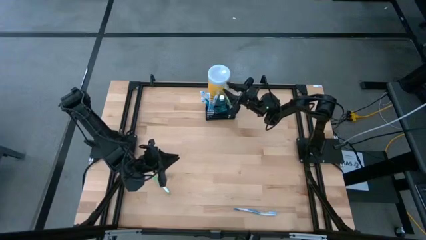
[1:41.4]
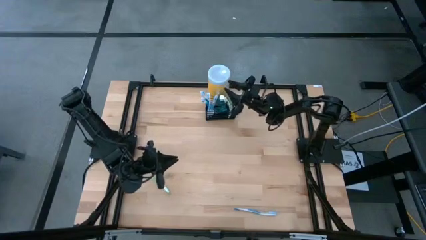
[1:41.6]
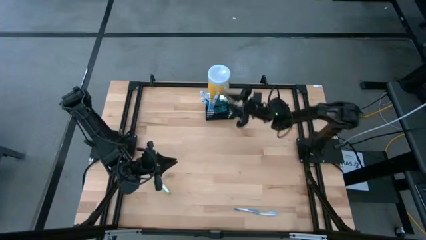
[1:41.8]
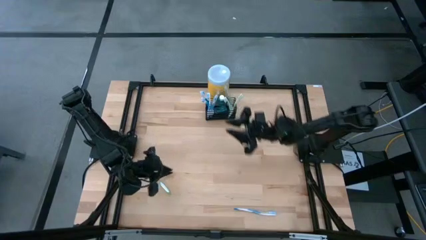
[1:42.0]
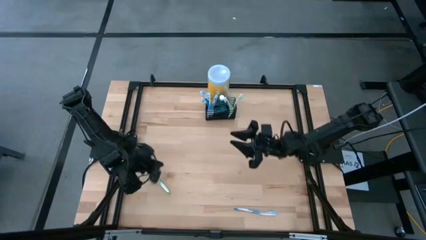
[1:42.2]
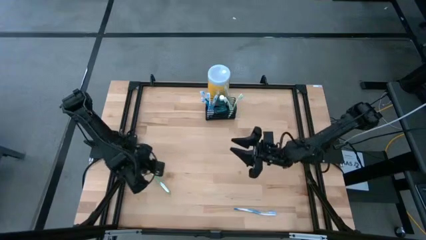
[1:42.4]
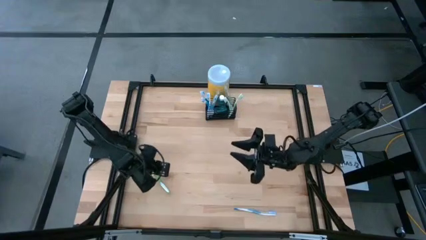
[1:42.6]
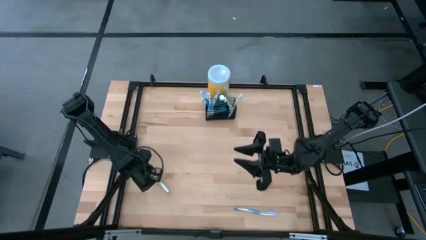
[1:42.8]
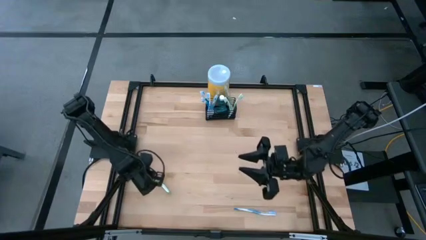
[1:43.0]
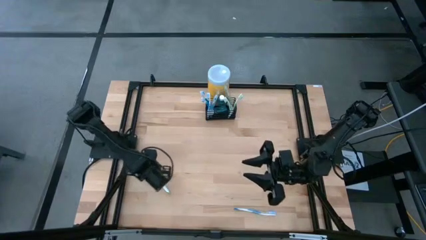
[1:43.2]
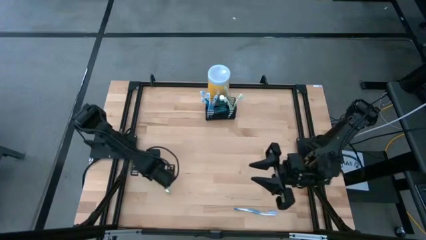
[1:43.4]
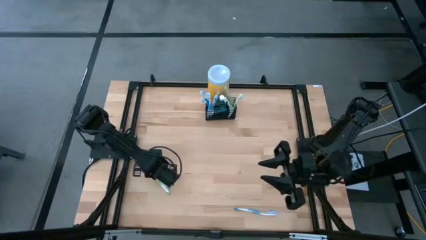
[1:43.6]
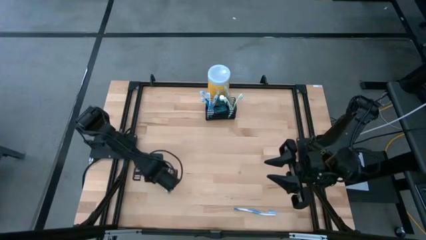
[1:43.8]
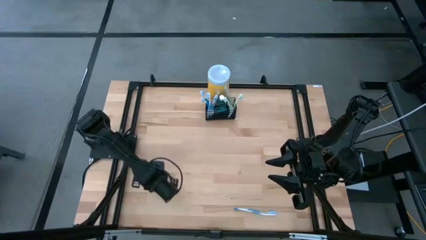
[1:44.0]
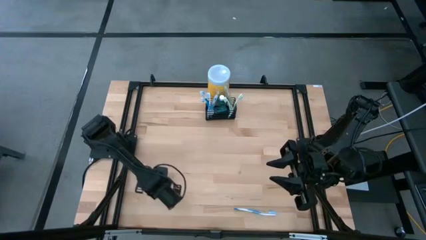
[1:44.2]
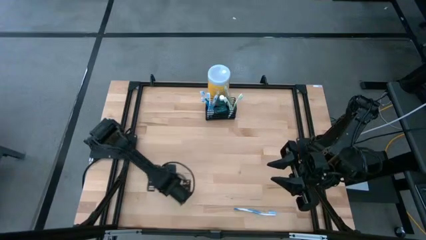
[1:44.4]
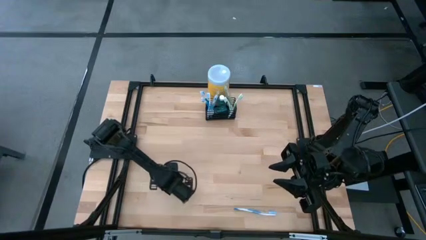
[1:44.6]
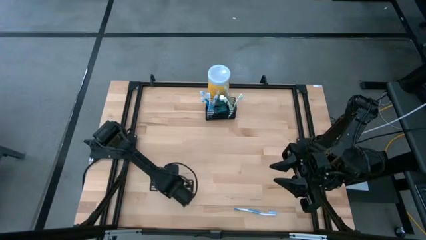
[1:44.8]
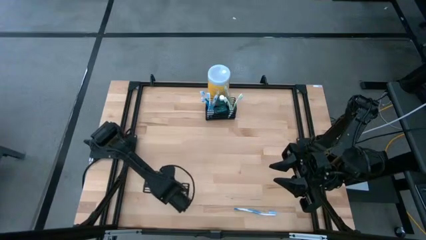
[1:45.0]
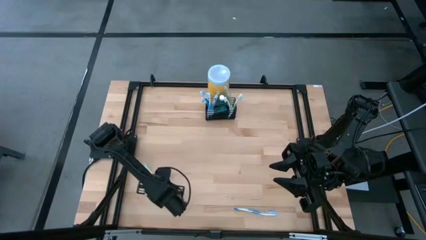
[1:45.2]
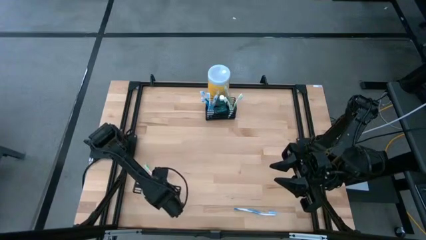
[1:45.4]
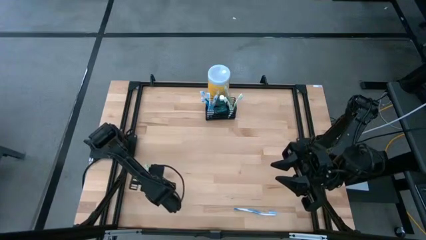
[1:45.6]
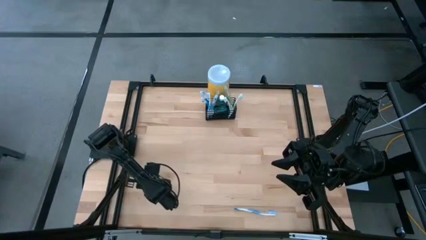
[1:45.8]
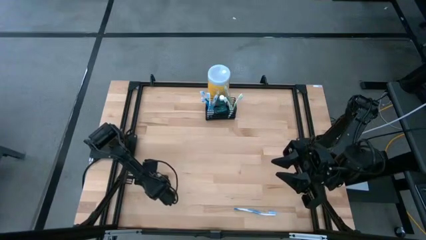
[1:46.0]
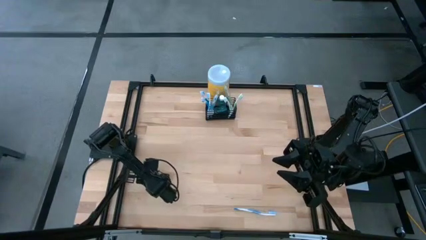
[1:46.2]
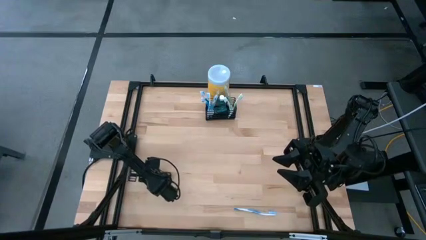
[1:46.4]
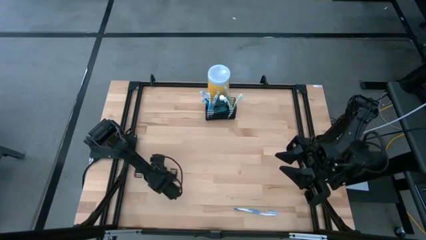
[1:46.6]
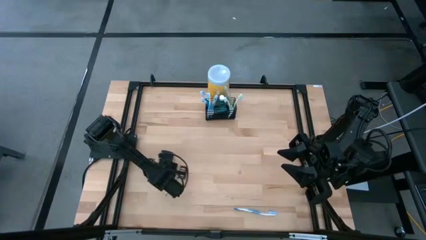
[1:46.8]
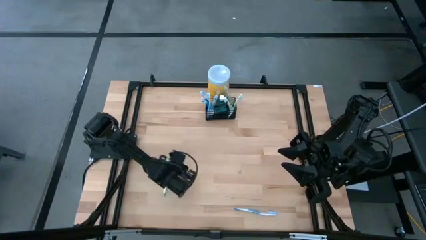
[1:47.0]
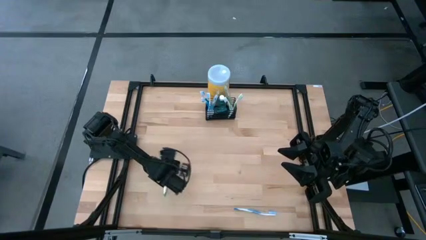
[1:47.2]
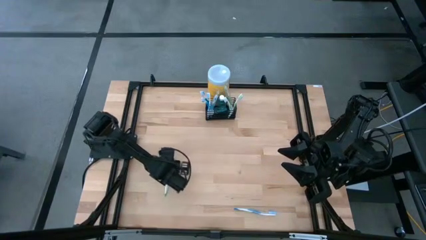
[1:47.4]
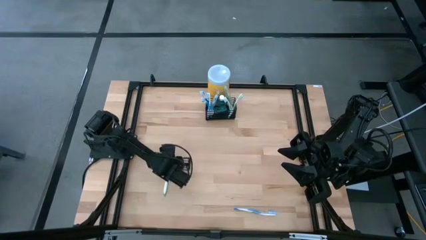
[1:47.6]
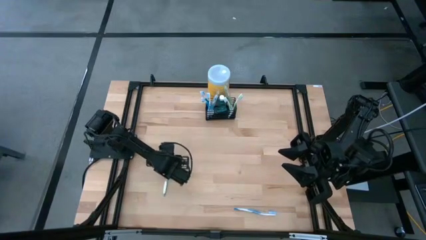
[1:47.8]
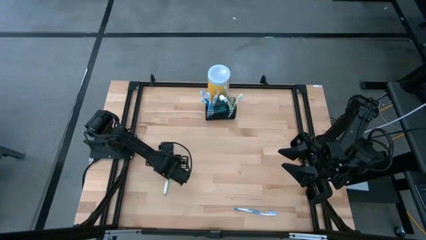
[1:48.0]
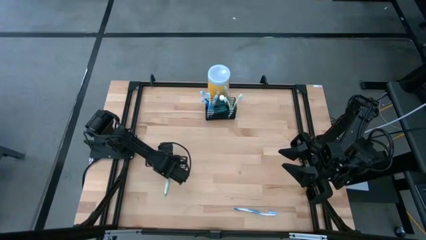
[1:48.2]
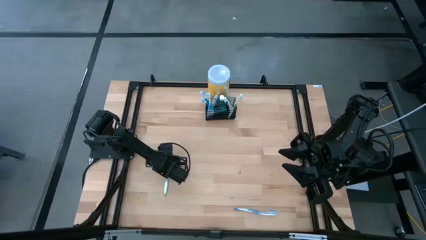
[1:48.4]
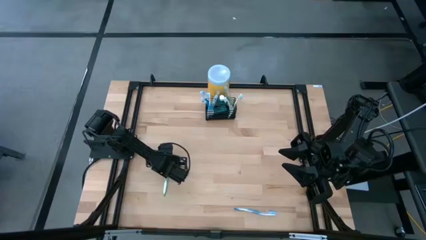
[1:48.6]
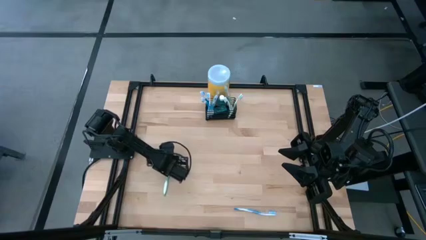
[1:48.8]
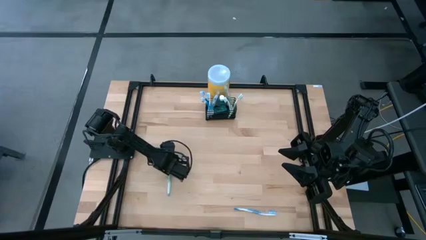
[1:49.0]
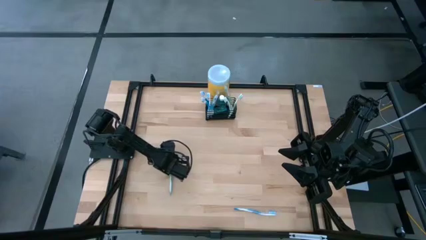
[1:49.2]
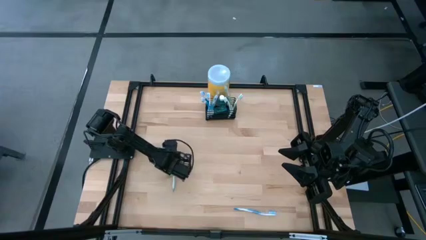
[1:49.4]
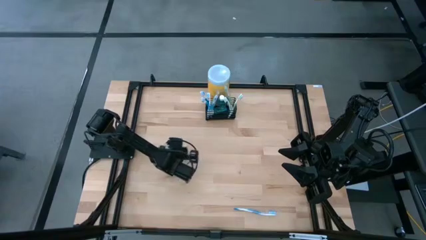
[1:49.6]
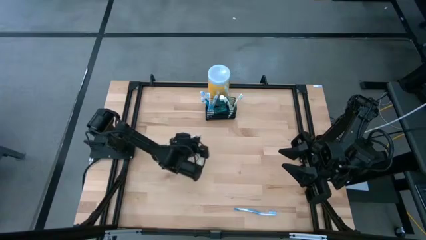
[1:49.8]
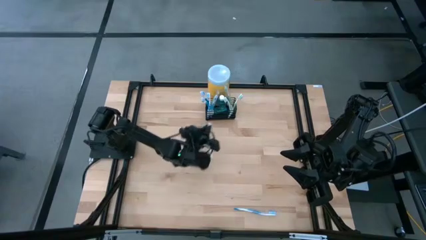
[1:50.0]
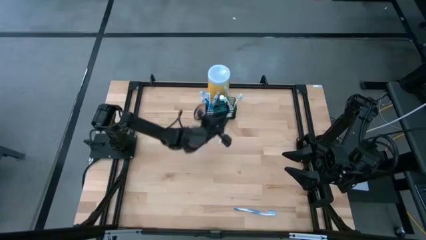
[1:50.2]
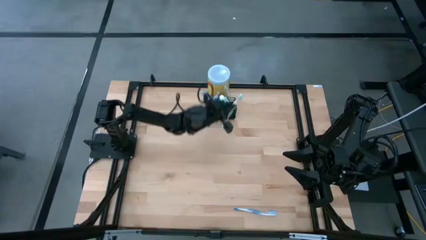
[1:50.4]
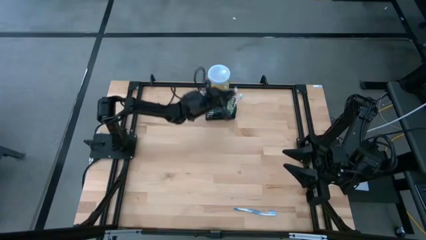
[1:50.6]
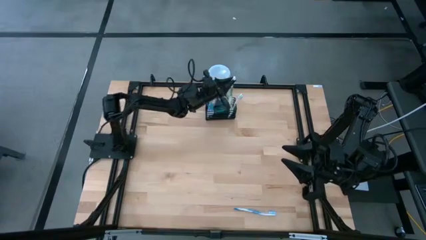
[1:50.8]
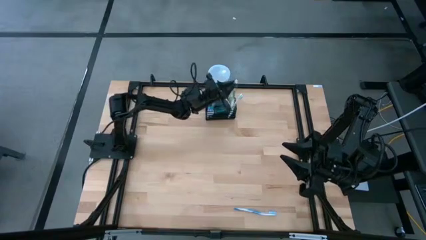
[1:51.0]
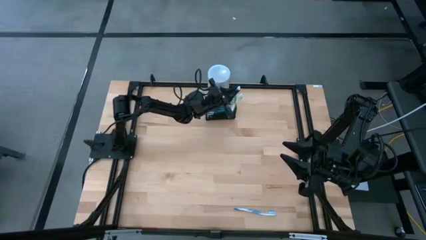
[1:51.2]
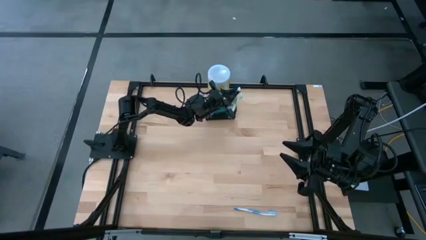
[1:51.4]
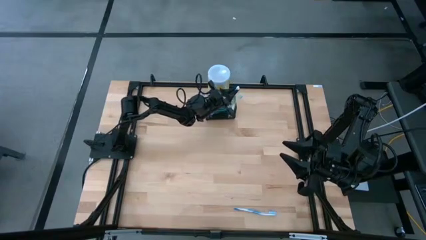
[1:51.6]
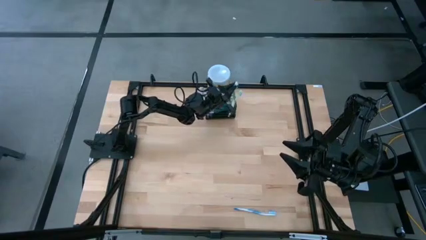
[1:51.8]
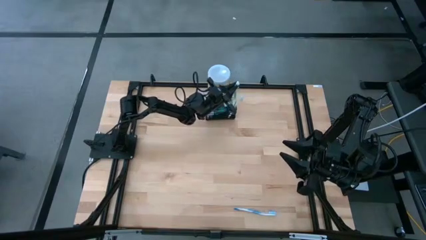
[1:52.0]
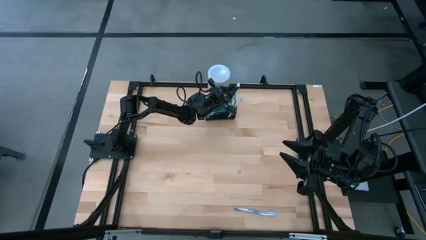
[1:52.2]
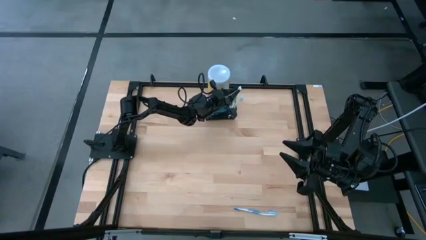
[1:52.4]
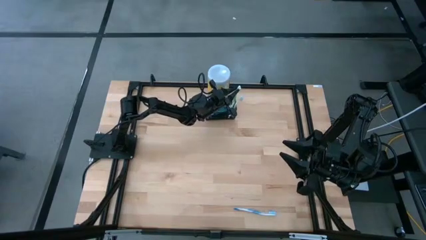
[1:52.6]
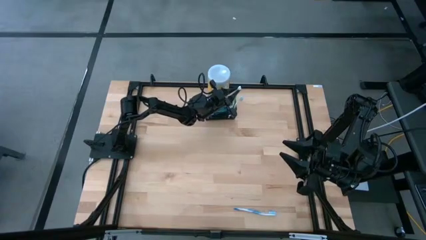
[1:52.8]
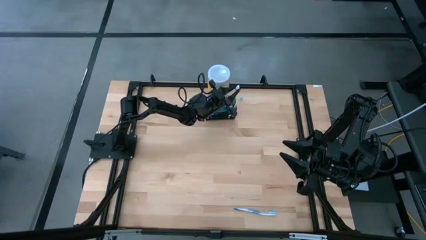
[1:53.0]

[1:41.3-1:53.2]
Task: Pick & Place toothbrushing station
Put the green toothbrush in the wire organizer

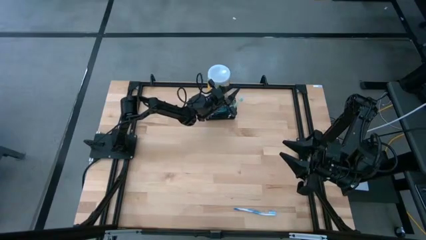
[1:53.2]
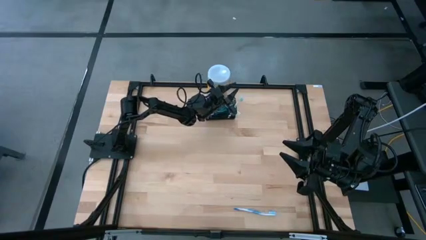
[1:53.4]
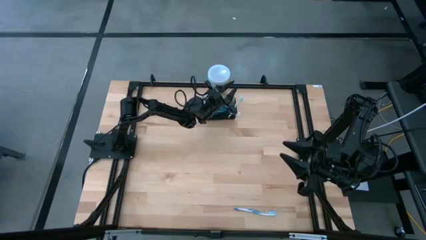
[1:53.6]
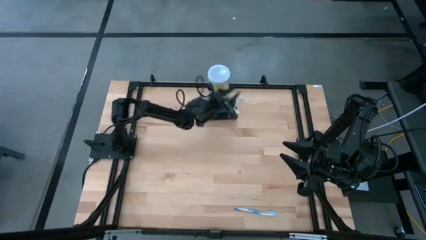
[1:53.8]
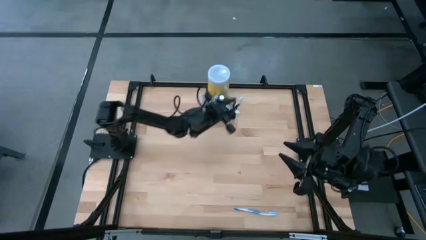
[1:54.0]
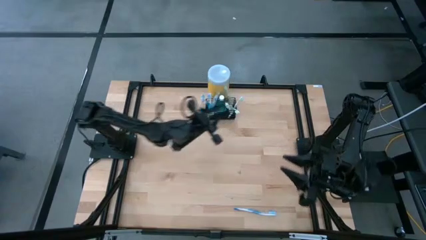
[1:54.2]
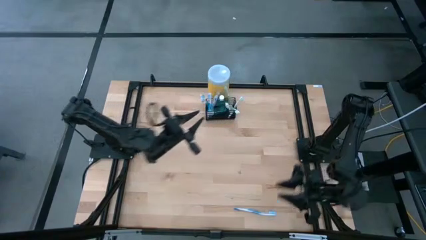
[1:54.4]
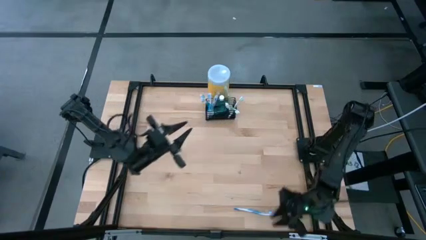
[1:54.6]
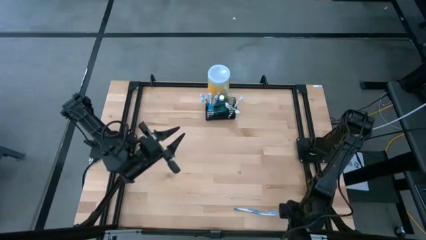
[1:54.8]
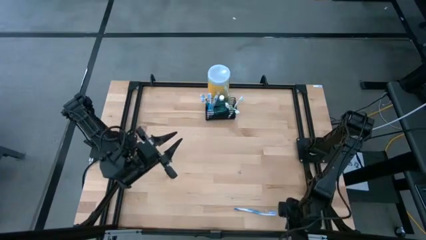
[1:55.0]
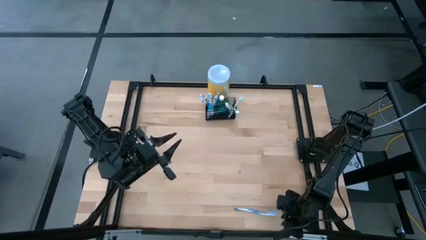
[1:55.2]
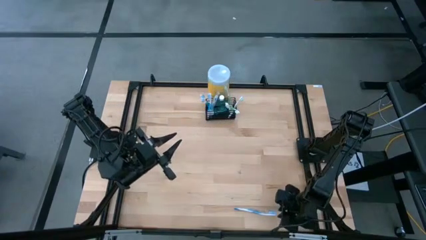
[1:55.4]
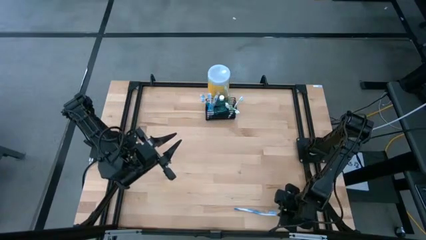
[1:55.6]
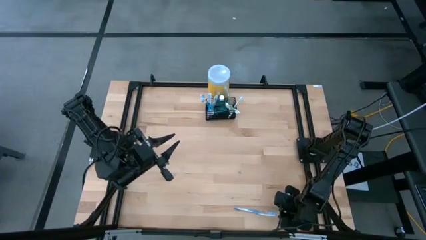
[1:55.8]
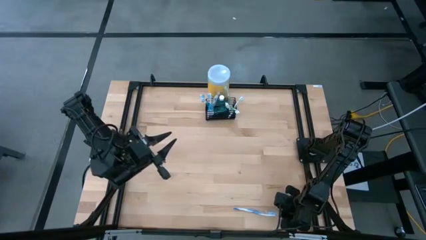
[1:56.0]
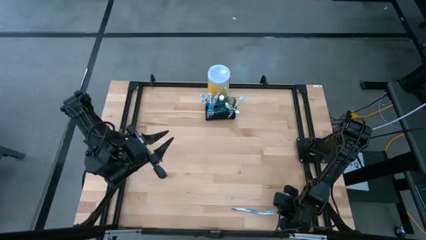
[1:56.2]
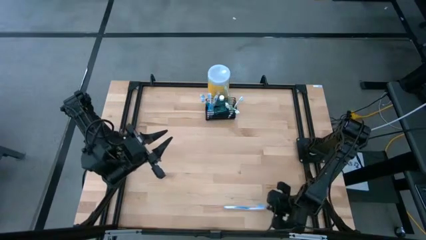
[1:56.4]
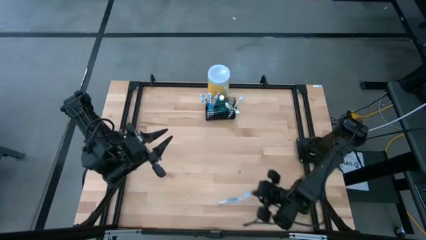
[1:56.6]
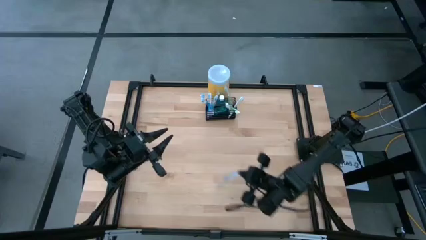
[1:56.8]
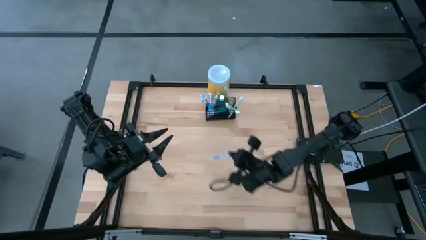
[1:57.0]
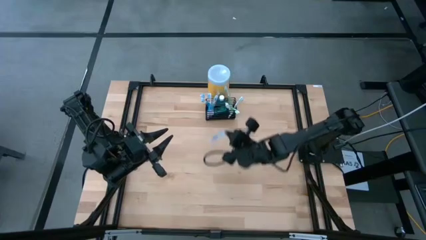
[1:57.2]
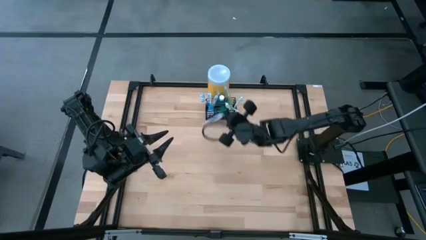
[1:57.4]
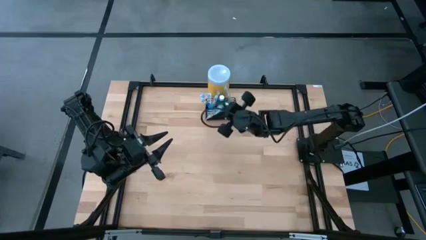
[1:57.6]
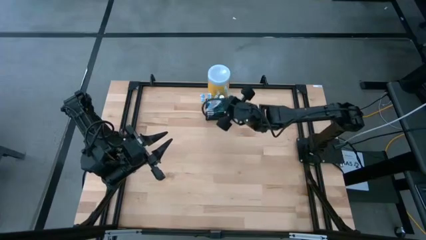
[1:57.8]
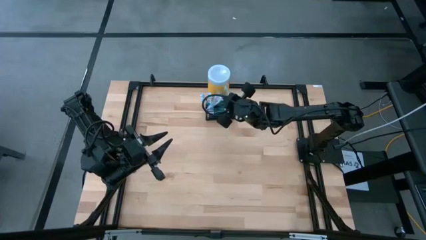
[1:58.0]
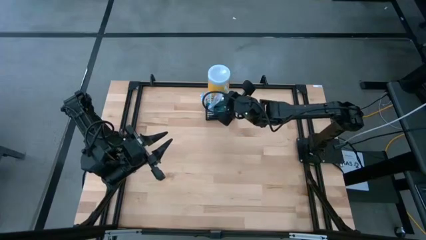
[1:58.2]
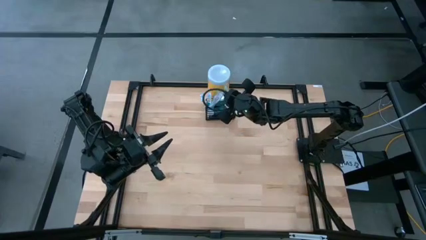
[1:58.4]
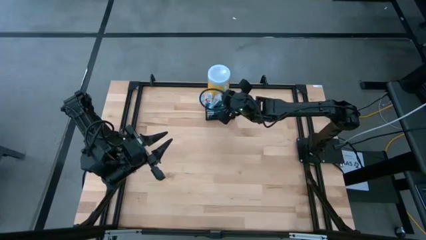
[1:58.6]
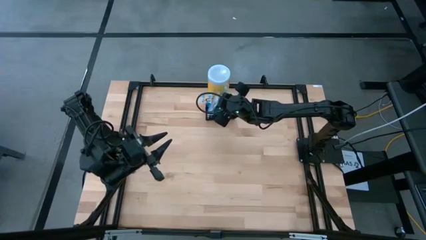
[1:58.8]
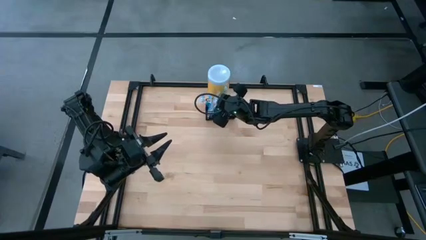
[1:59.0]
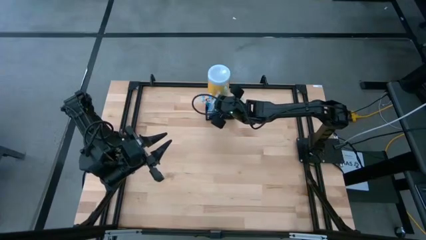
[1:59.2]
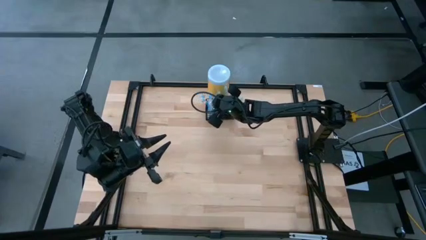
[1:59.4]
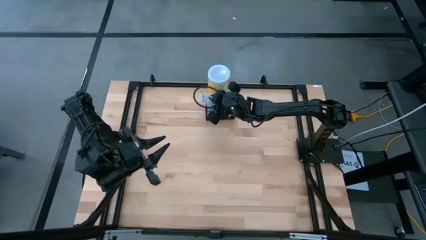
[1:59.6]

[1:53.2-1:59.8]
Put the blue toothbrush in the wire organizer
